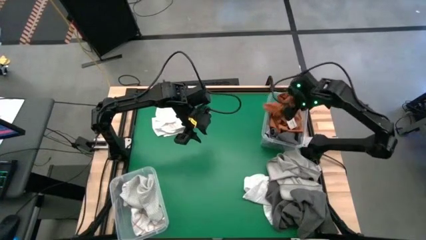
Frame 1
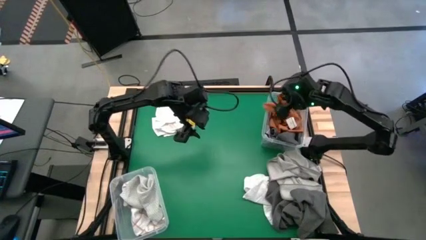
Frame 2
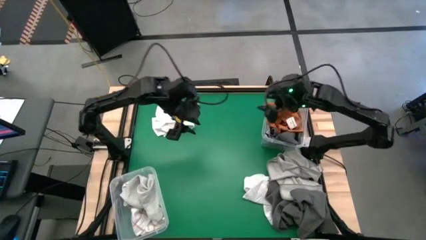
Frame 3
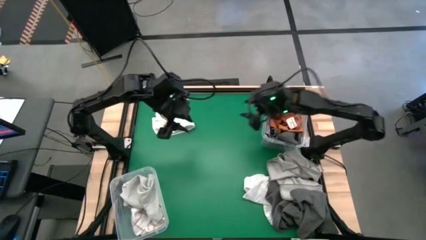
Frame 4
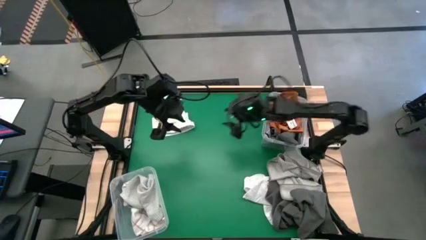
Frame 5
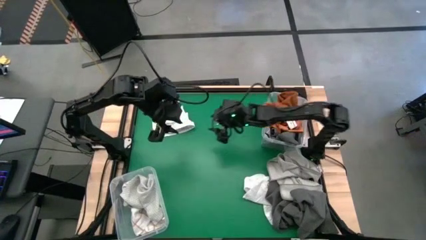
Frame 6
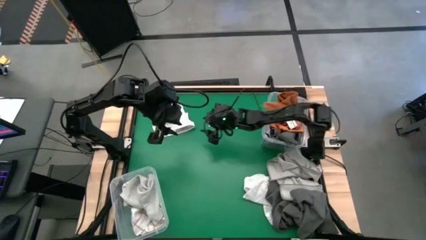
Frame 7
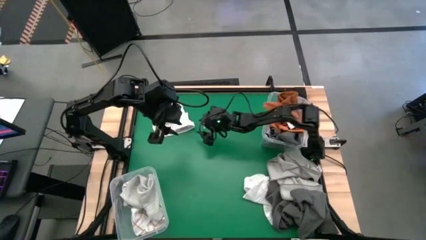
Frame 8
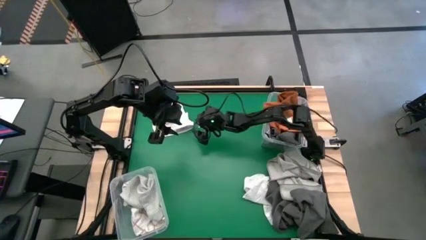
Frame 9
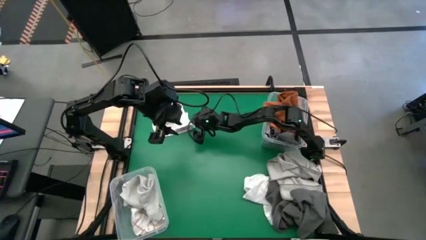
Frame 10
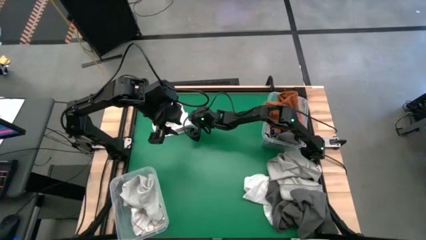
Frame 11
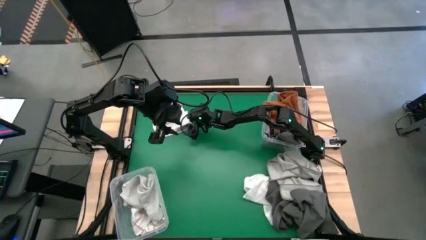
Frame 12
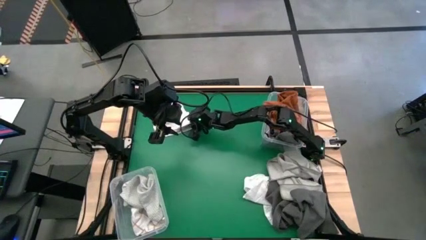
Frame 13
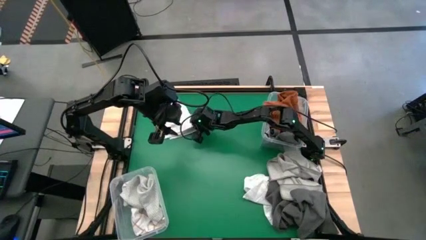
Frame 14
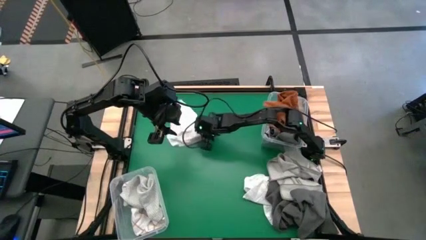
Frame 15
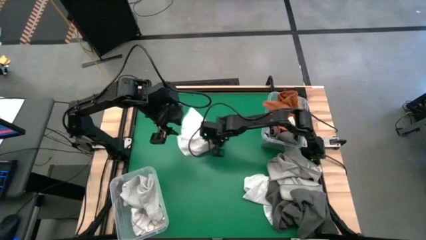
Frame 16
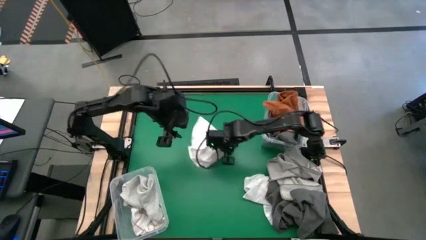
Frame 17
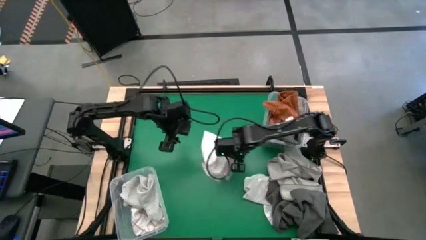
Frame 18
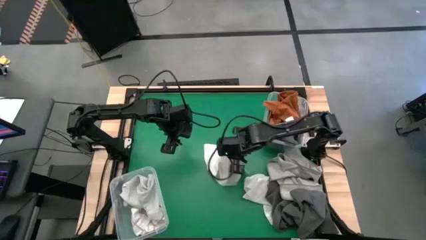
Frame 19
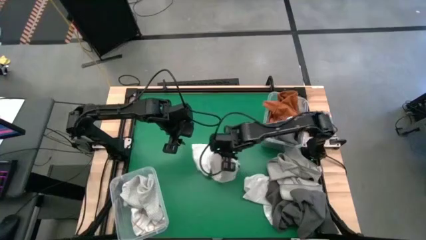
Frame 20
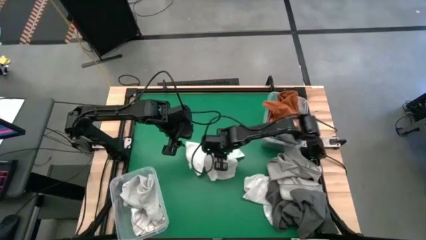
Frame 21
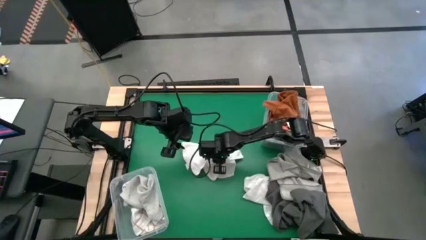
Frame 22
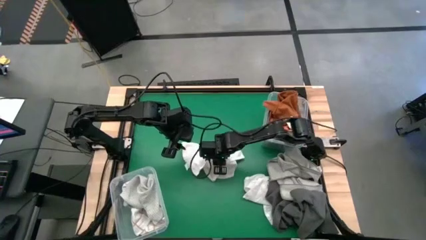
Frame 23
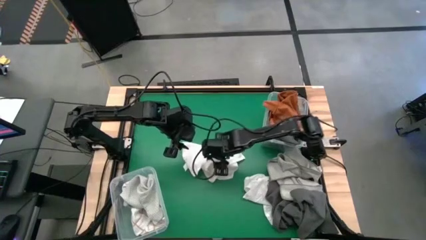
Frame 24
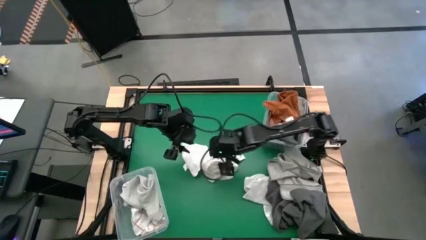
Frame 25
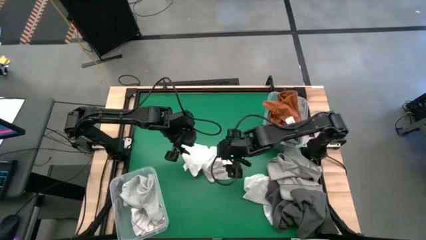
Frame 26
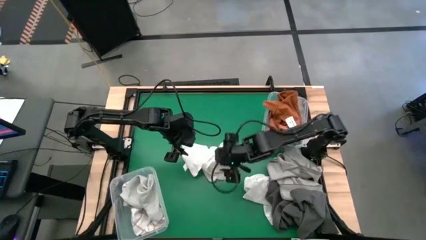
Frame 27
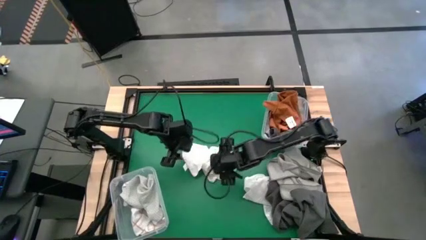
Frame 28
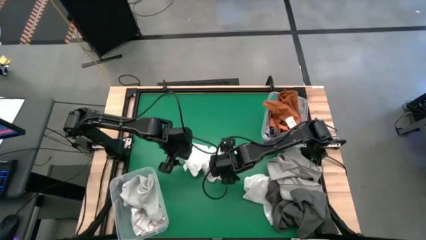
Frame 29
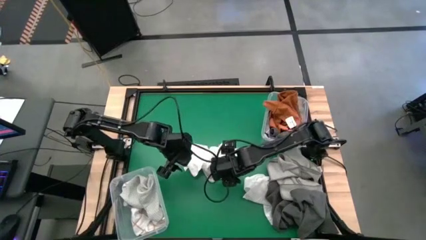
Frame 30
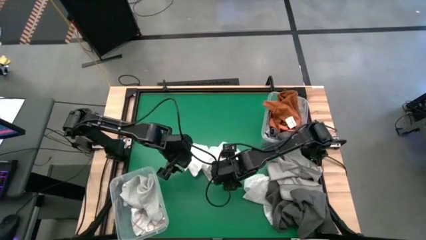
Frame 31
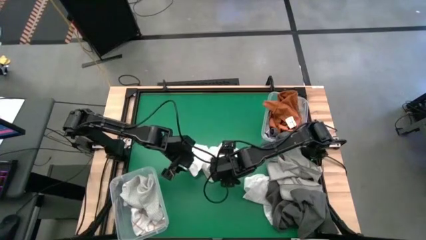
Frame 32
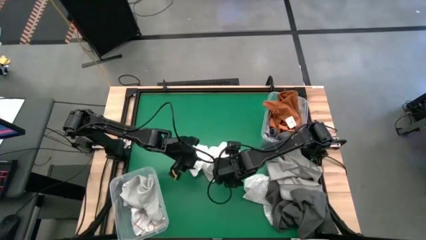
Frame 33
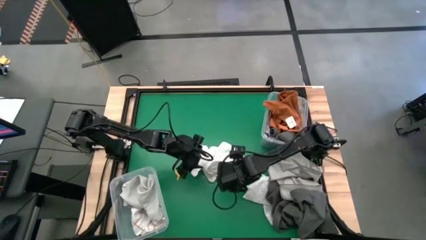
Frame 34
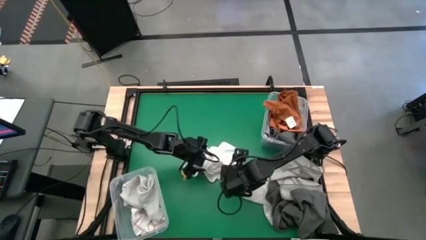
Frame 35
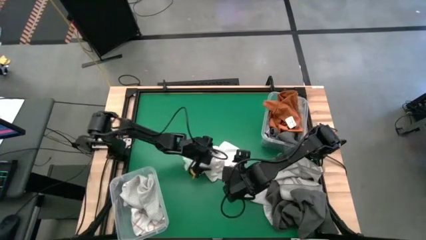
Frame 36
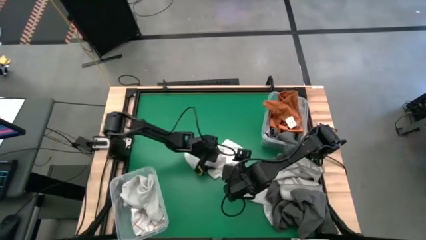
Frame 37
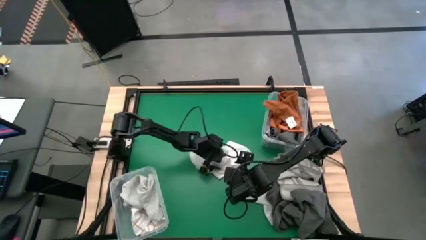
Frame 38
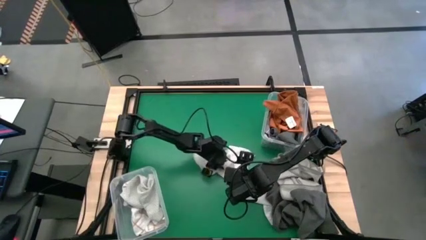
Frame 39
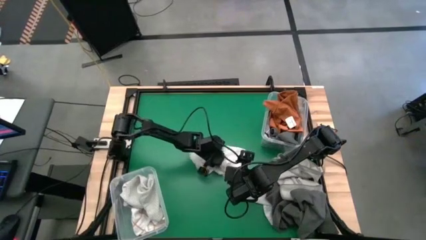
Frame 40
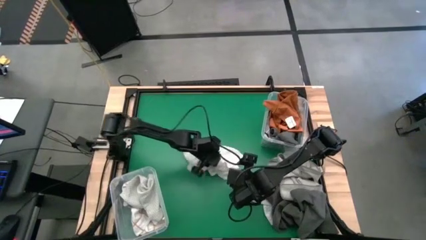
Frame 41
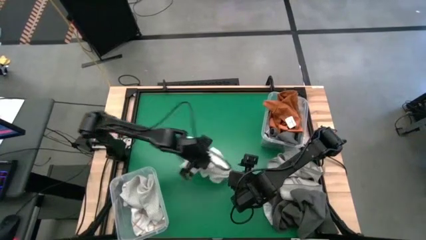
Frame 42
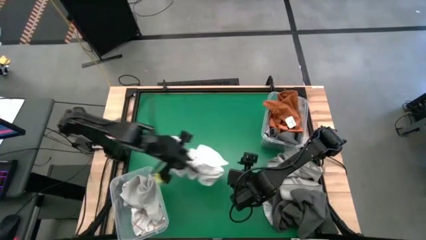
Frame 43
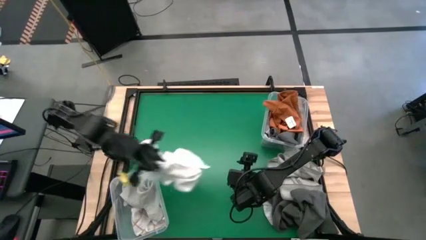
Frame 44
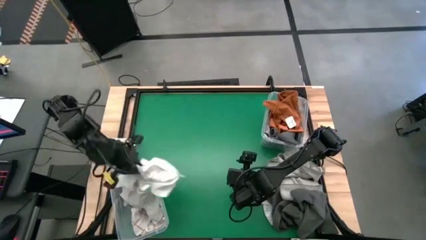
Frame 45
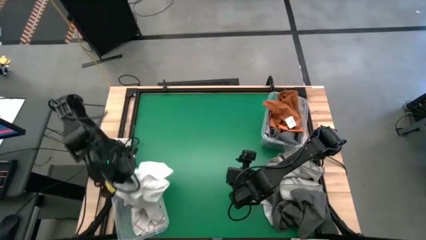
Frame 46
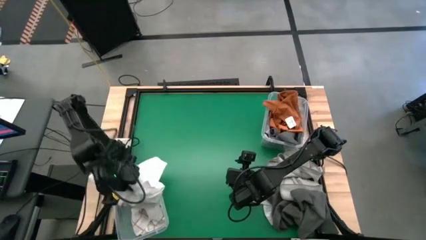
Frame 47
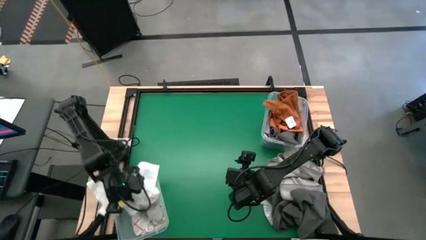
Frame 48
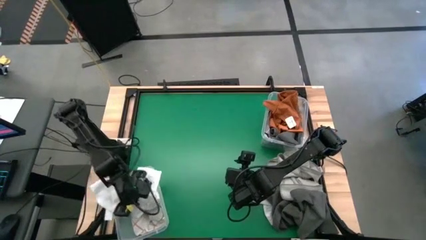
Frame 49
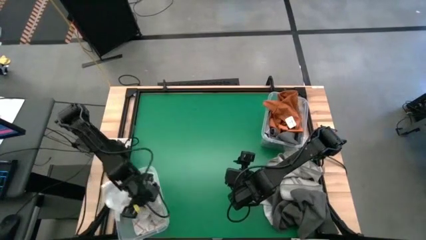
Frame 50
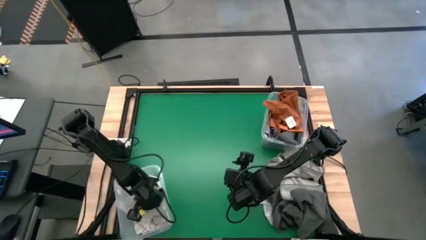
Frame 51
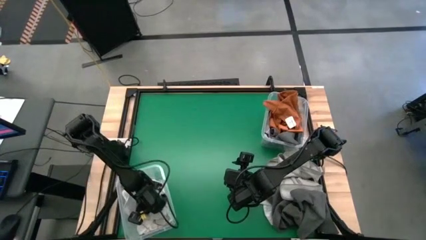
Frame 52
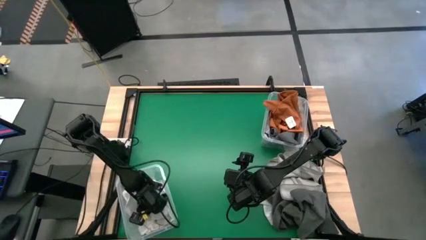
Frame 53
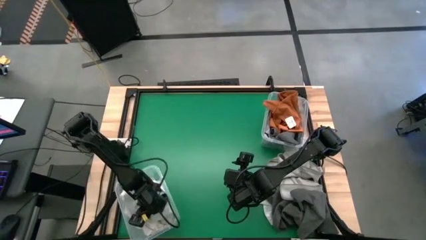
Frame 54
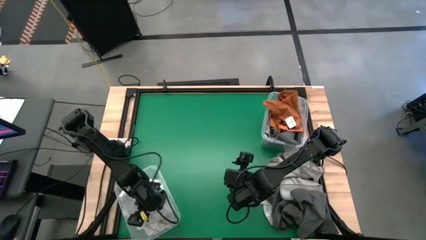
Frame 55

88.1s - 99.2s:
Task: Sort towels by color in basket
Put the white microfiber towel into the bottom transparent bin
